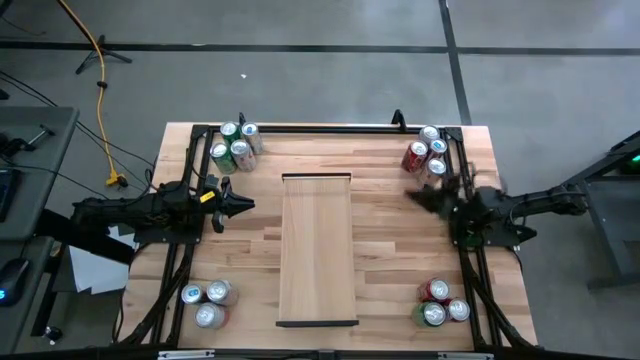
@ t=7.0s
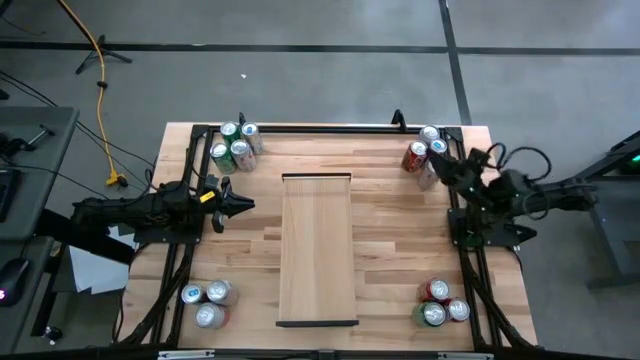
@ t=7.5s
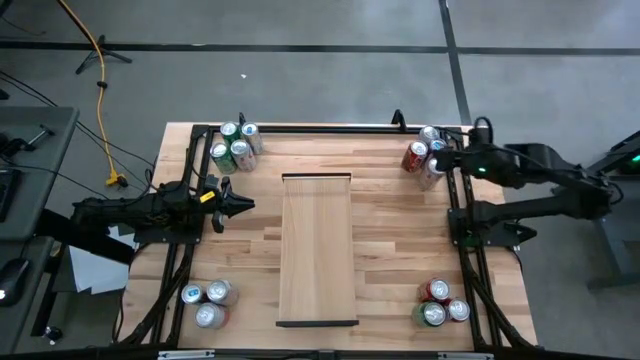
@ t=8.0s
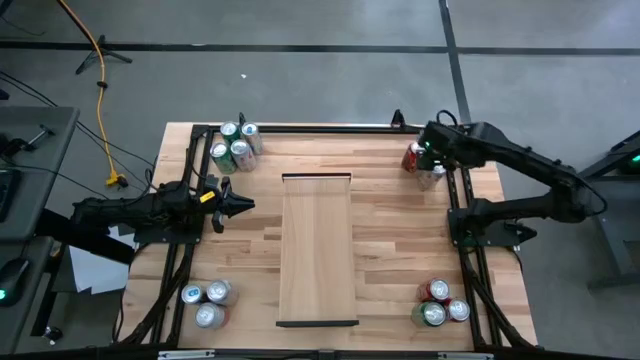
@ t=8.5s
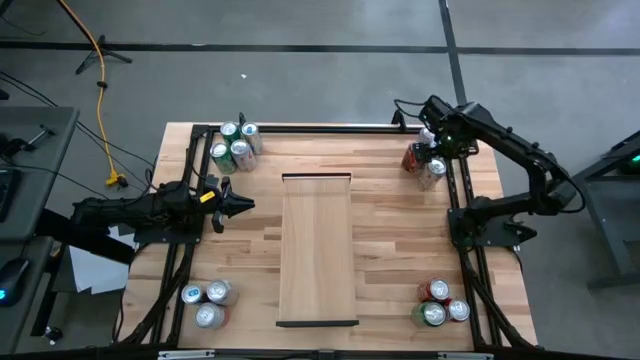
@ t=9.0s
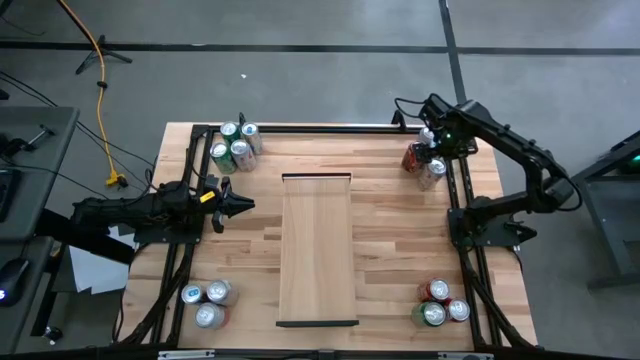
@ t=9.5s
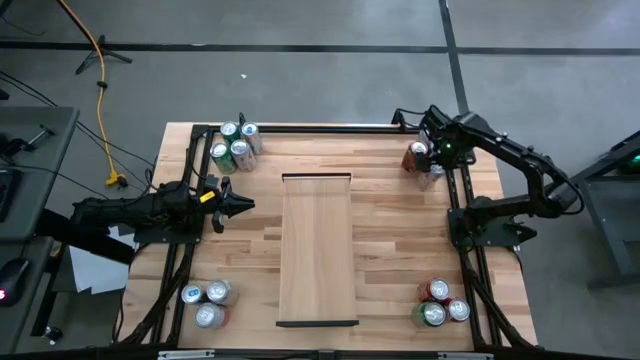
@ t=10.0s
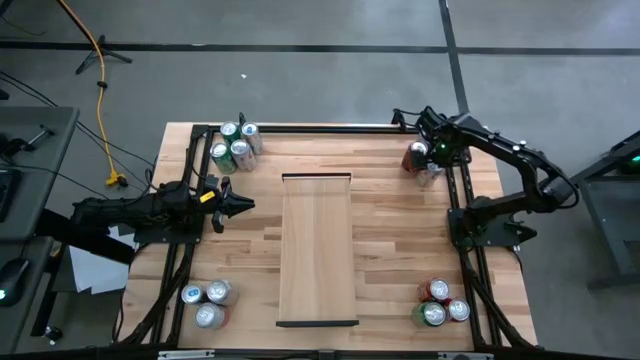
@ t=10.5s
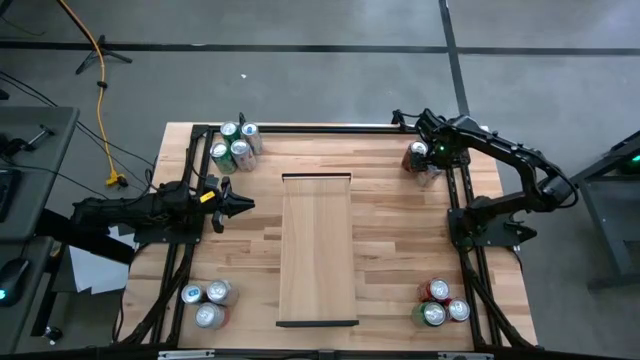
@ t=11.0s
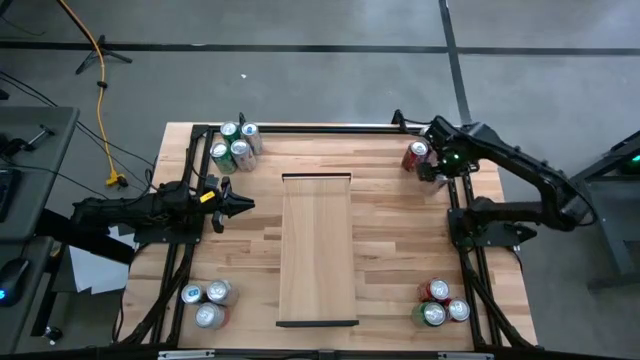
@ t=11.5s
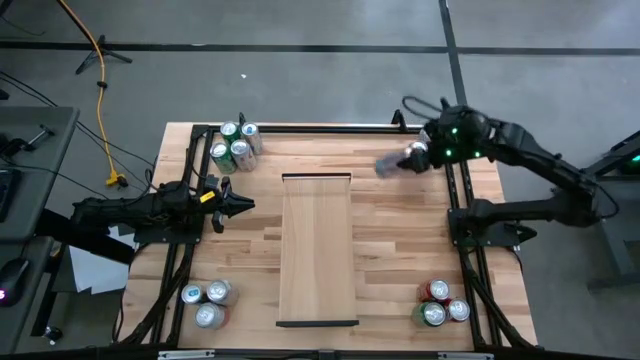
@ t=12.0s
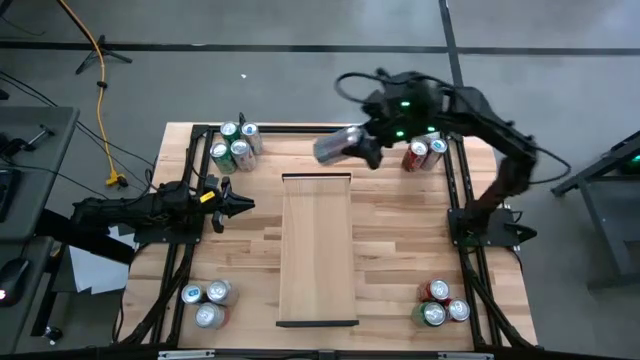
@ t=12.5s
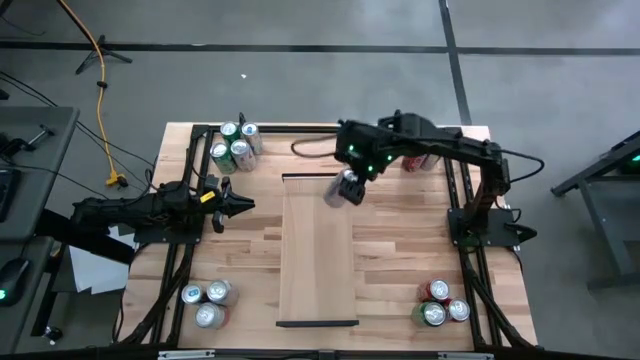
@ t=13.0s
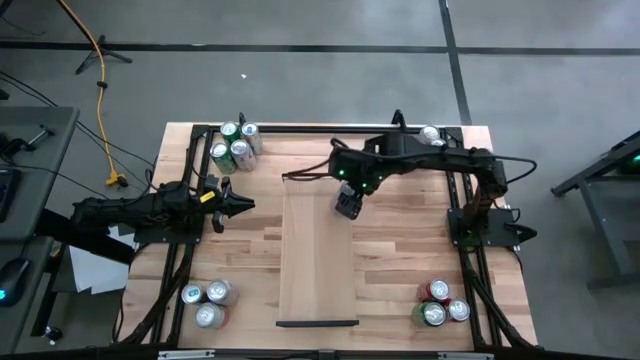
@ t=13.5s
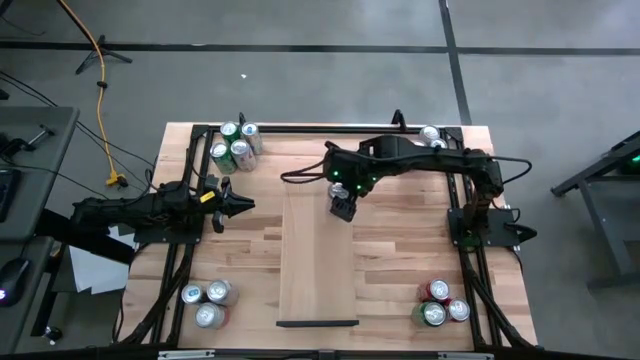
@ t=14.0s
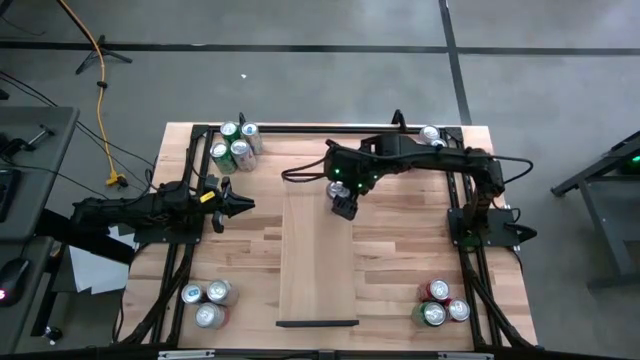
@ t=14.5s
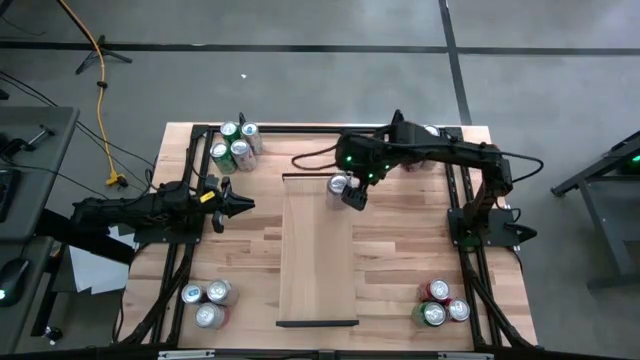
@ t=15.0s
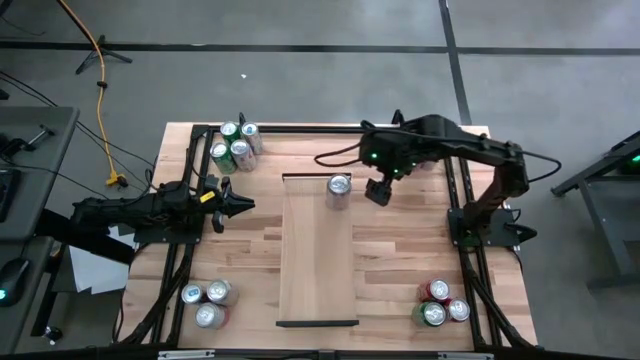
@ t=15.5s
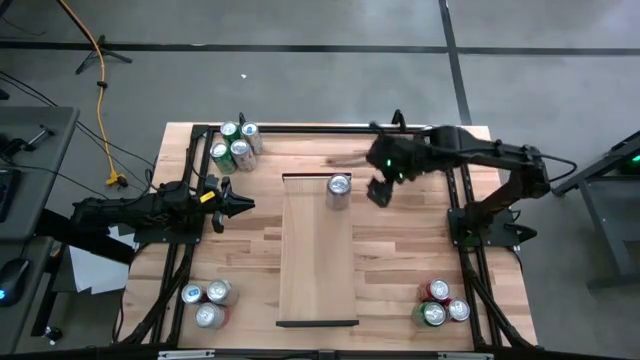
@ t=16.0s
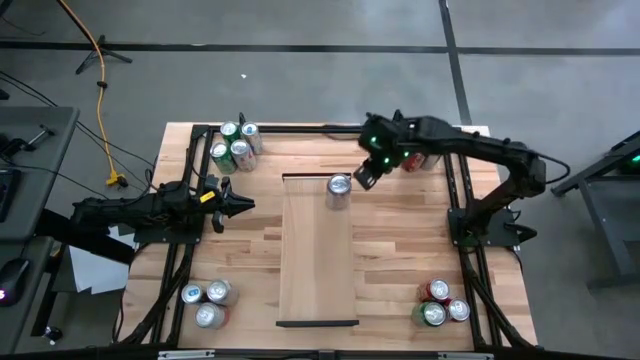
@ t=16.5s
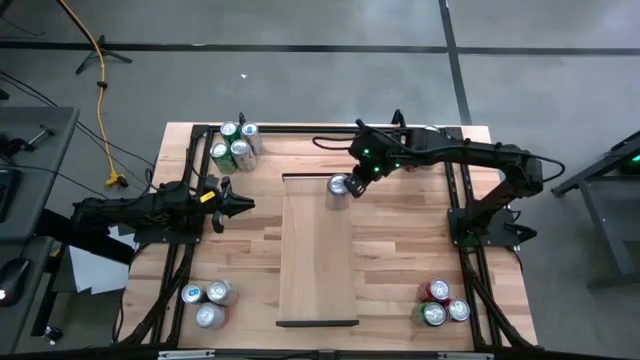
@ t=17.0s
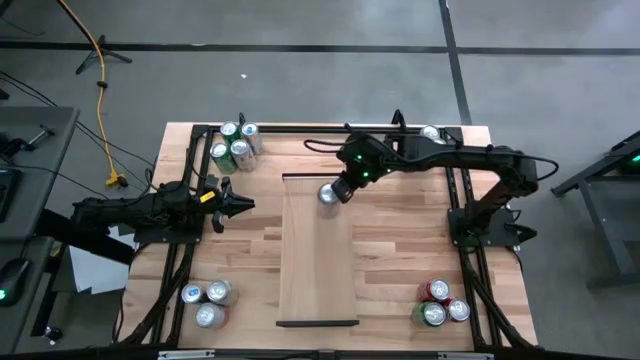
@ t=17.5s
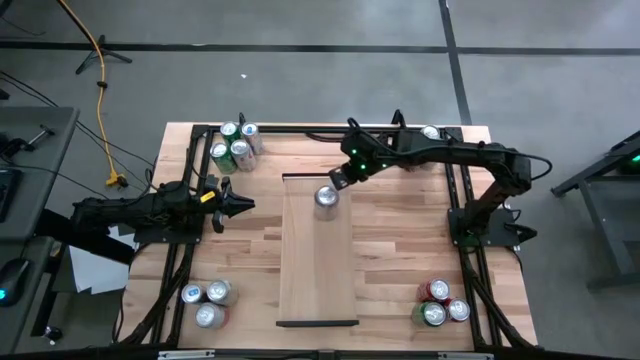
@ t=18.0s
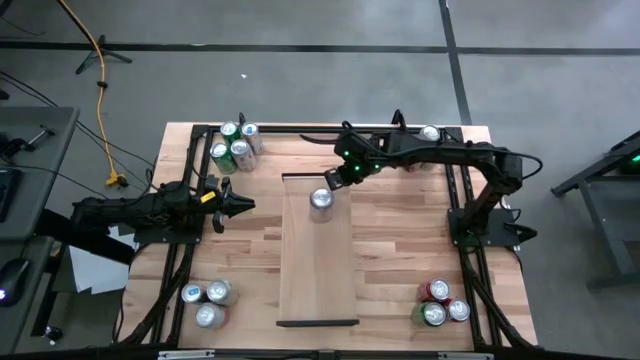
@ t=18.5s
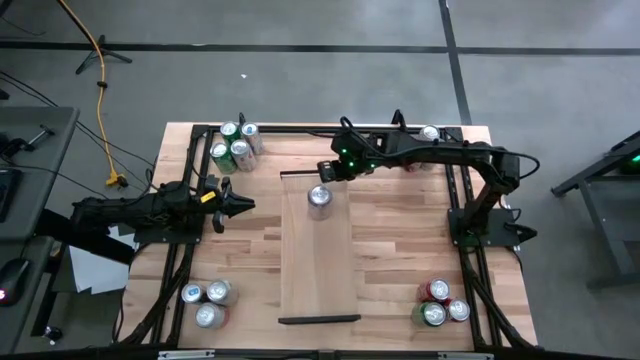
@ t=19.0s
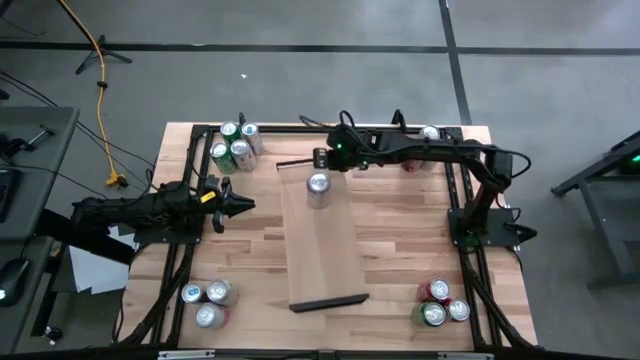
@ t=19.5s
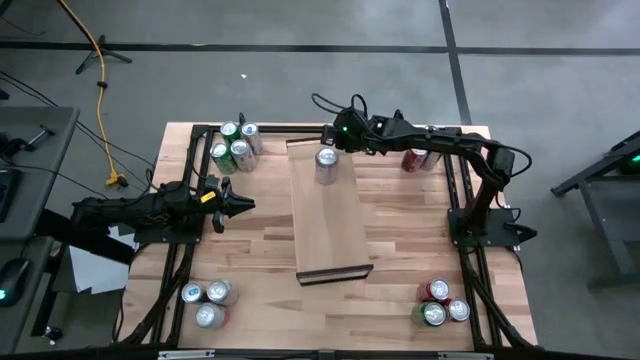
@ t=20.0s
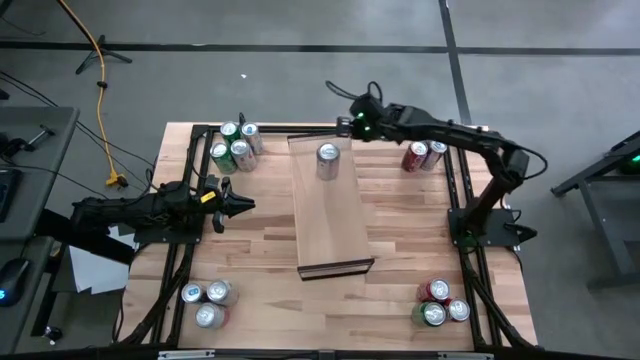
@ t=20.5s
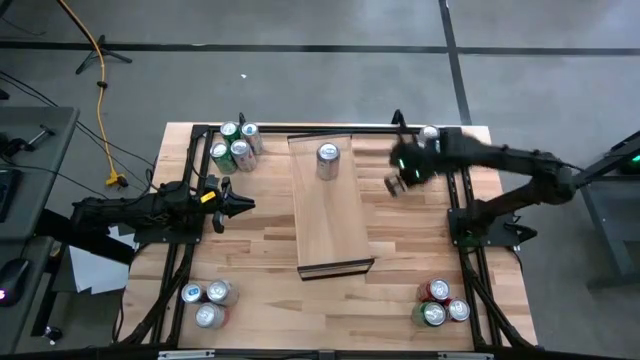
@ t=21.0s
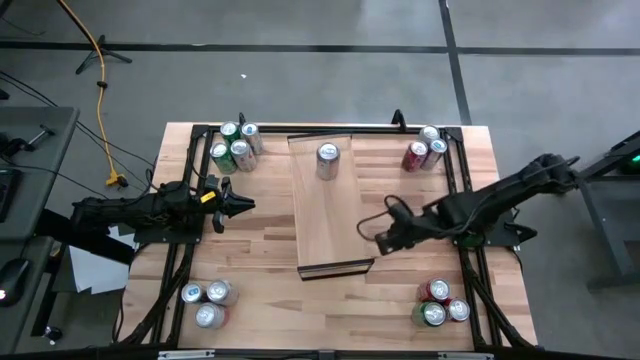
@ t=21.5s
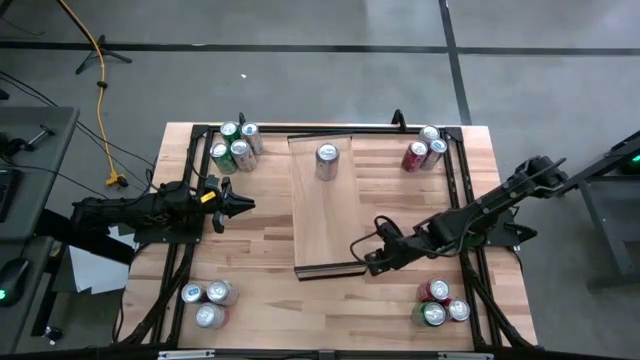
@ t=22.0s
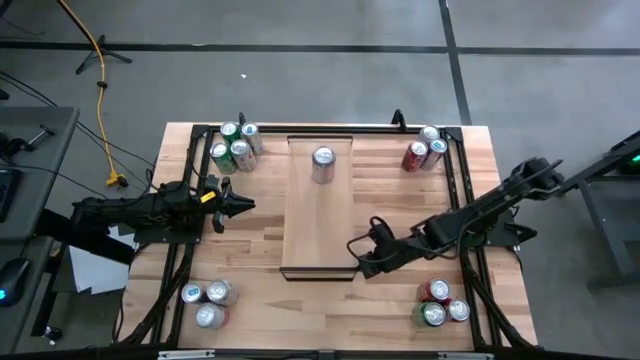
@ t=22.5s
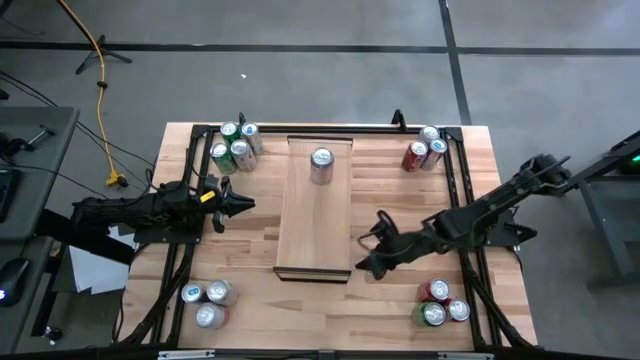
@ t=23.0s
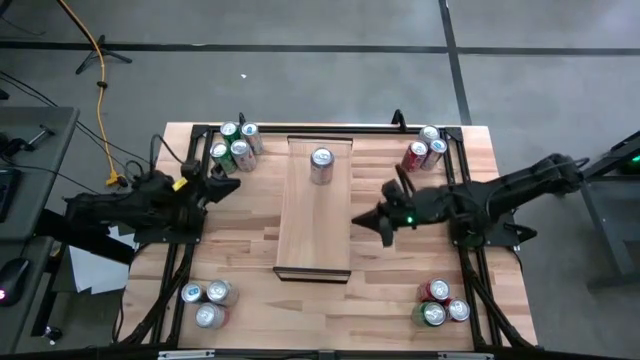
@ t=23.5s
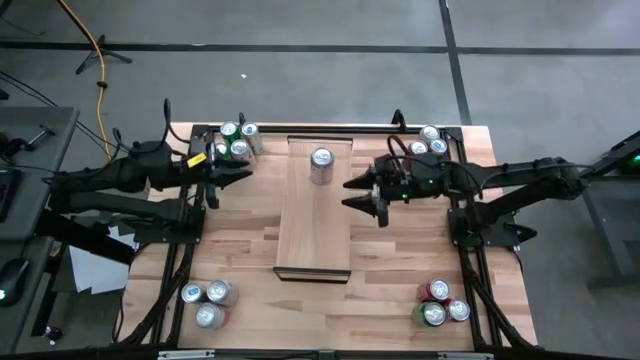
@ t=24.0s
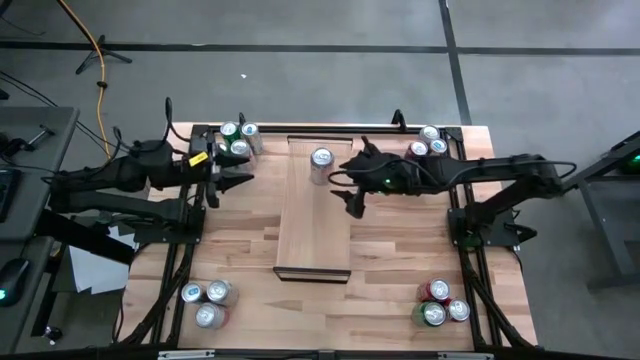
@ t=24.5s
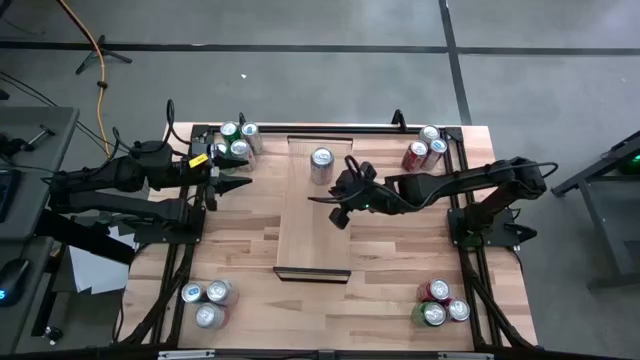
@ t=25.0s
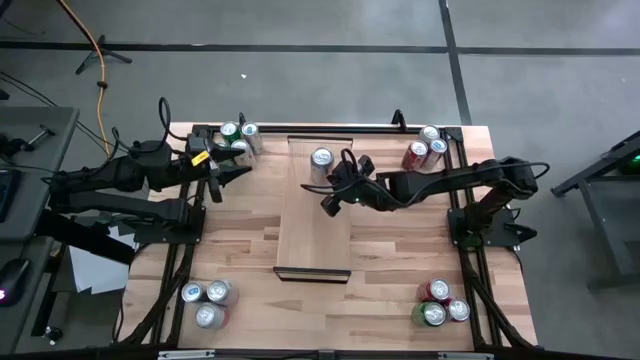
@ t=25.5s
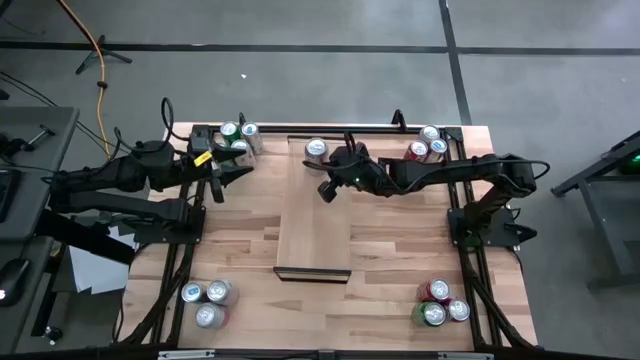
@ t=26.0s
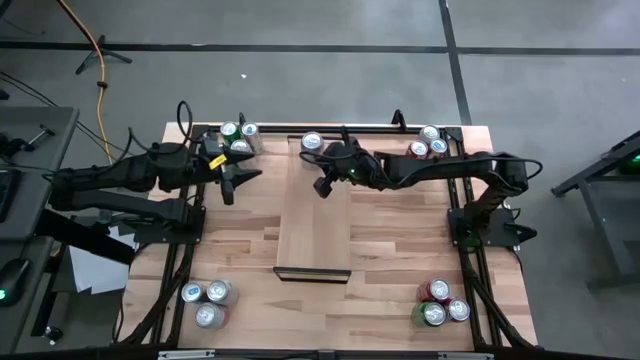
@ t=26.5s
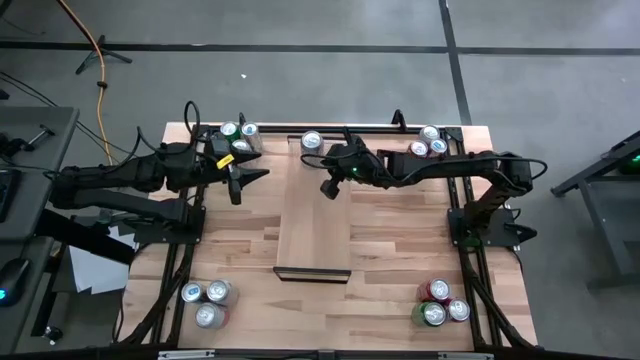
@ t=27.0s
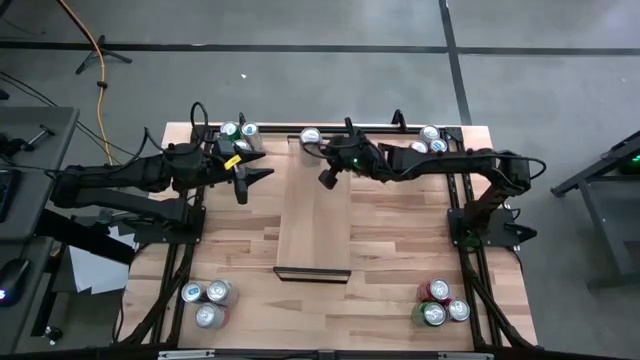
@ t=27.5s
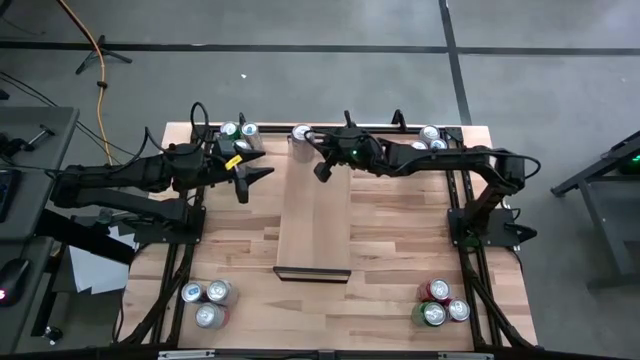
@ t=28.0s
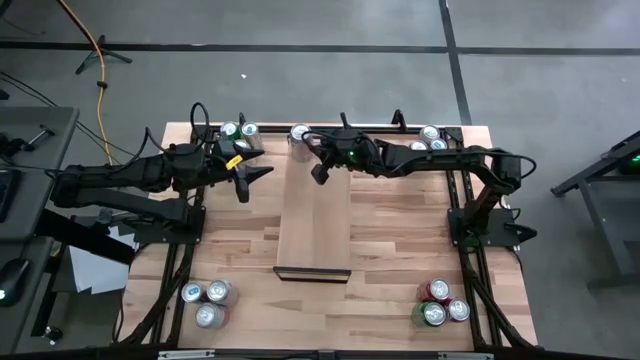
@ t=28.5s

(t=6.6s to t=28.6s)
Task: Place canned beverage on shelf
Put the silver soda can on the shelf
